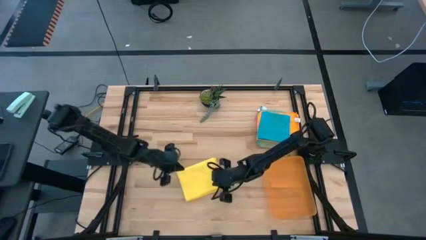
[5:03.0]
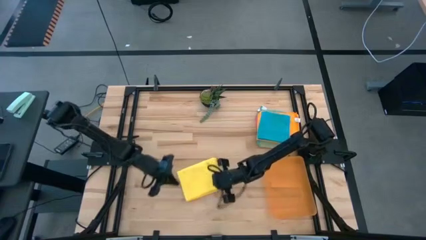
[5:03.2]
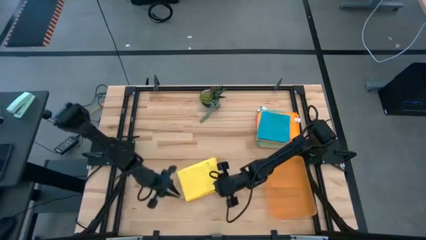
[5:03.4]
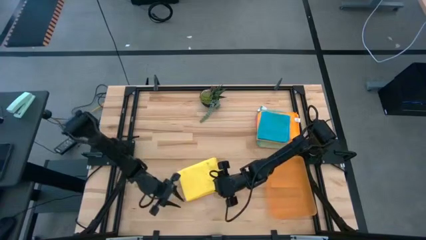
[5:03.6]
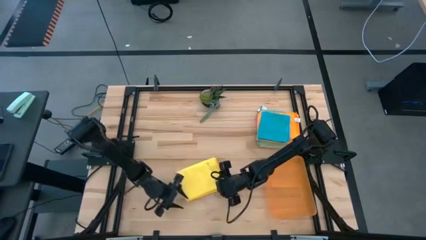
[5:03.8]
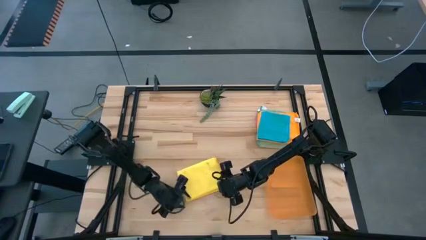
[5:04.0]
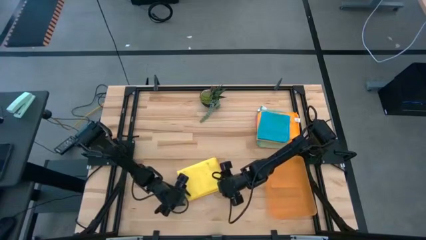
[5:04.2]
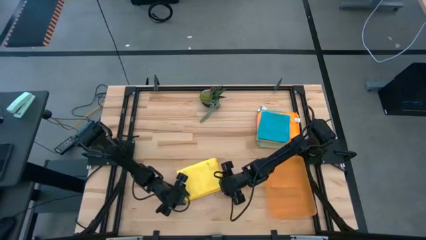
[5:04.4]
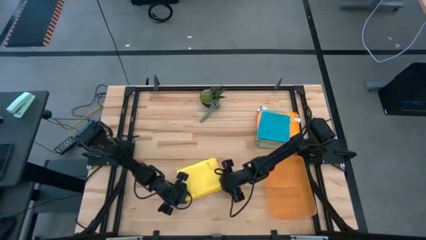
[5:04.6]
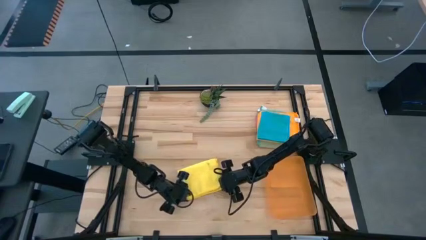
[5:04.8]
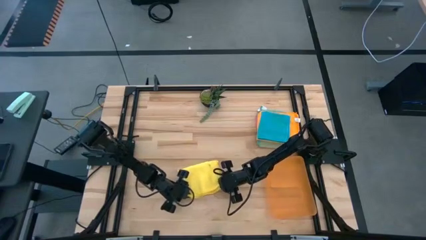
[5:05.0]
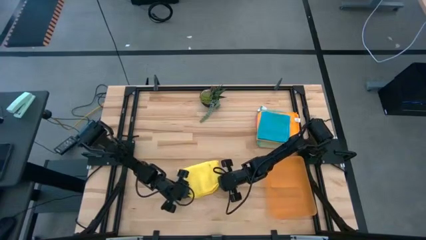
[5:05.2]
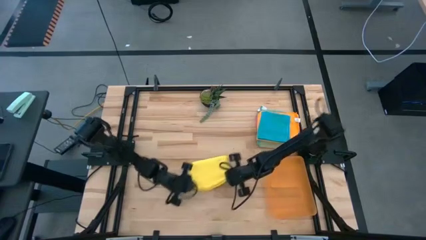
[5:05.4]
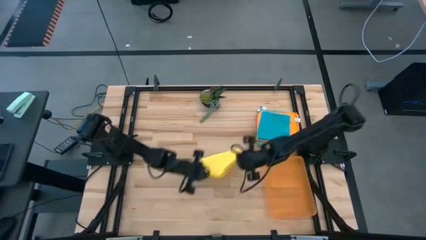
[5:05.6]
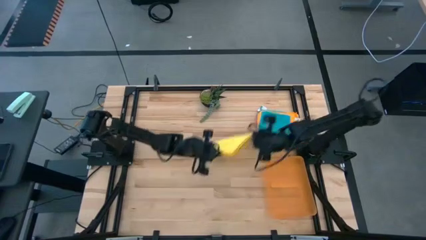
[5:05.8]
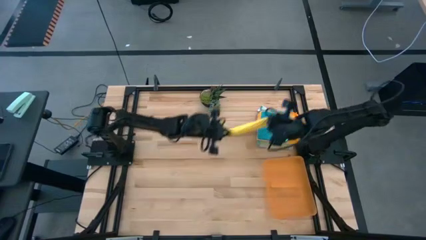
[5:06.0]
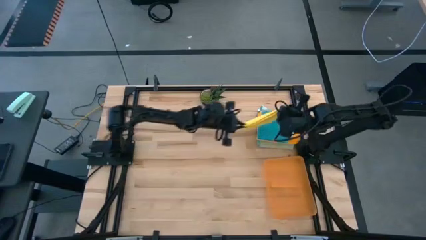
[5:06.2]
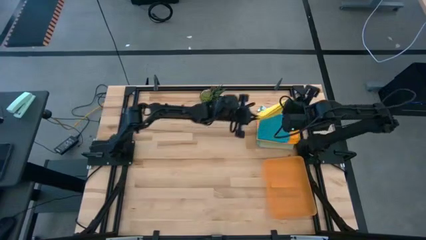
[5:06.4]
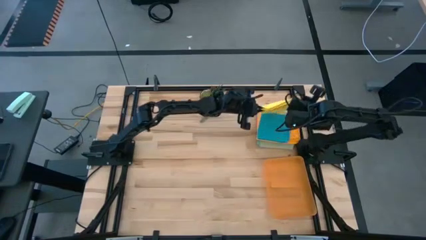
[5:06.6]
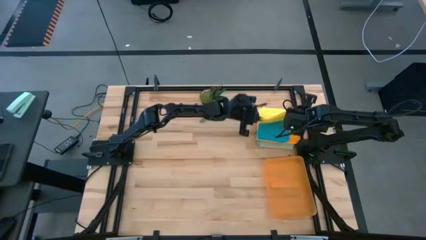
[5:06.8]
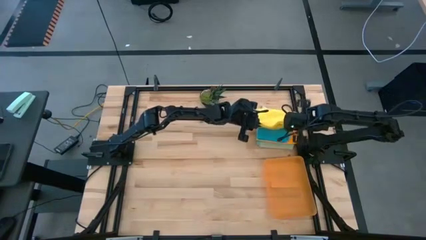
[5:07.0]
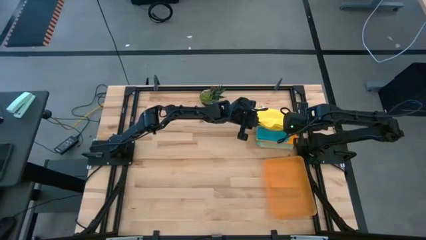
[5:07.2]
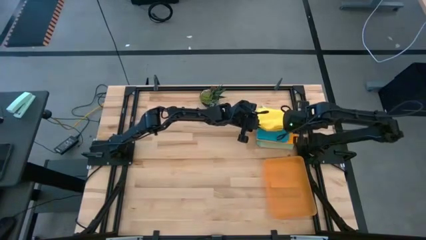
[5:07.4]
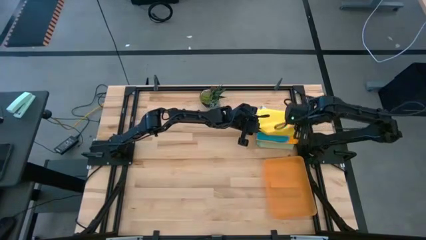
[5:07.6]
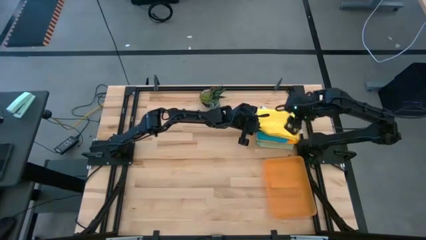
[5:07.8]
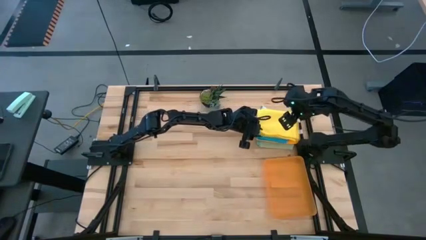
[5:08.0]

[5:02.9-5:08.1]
Task: Fold microfiber towels
Stack the yellow microfiber towel on top of the blue microfiber towel

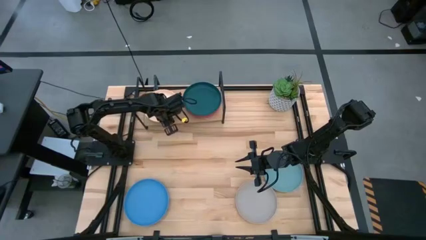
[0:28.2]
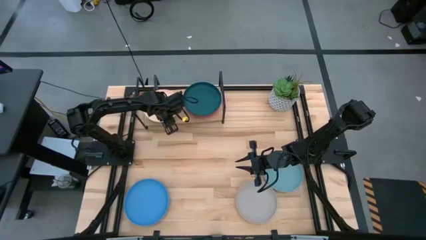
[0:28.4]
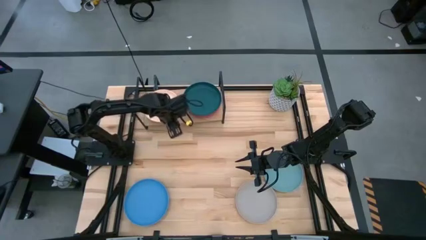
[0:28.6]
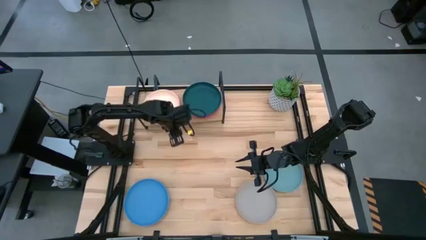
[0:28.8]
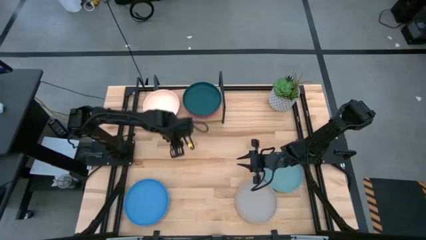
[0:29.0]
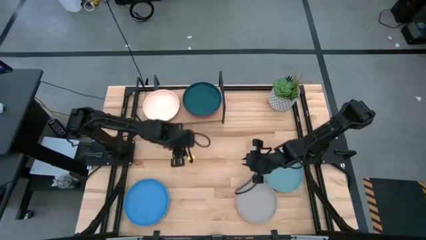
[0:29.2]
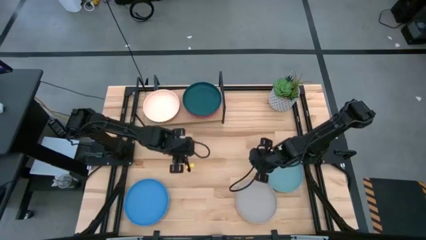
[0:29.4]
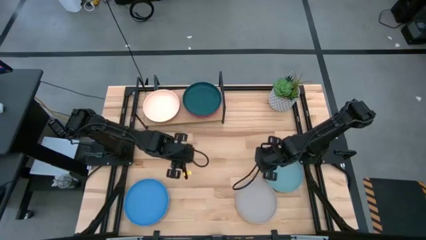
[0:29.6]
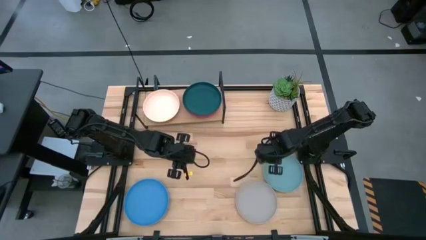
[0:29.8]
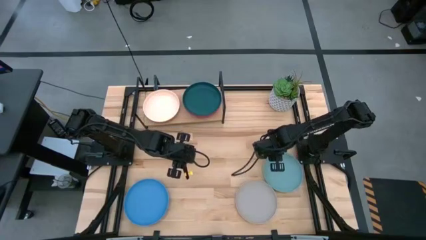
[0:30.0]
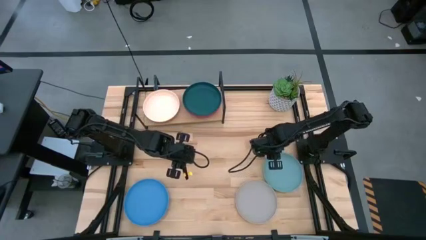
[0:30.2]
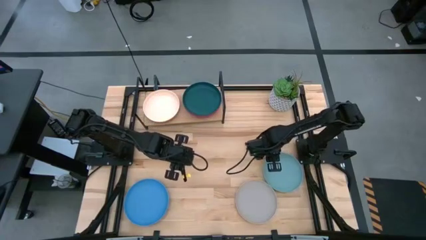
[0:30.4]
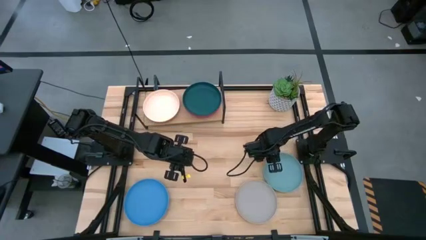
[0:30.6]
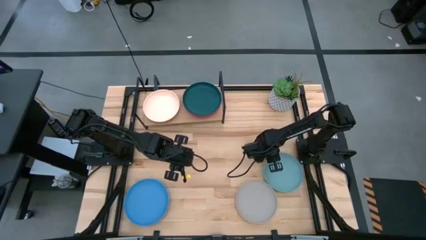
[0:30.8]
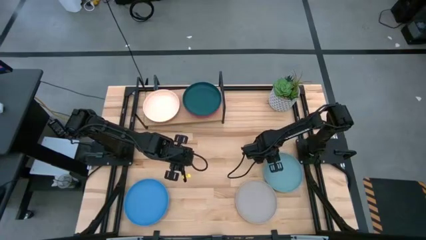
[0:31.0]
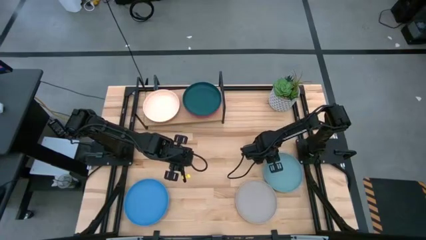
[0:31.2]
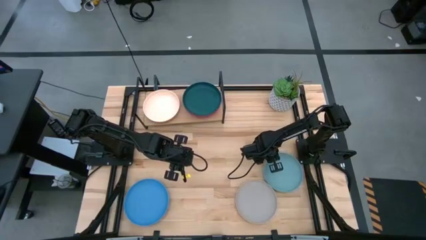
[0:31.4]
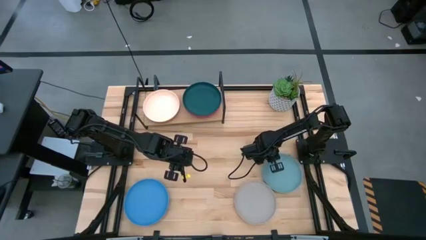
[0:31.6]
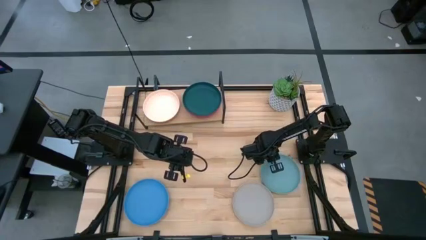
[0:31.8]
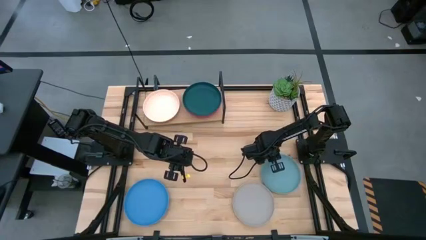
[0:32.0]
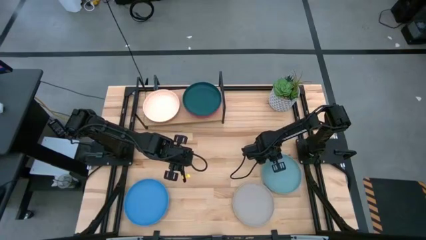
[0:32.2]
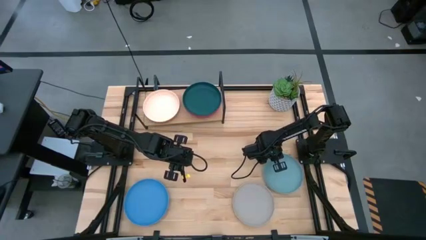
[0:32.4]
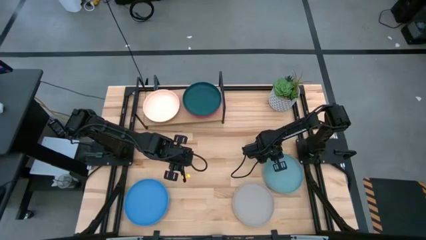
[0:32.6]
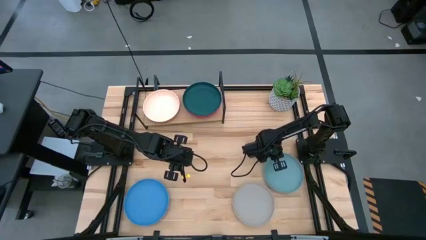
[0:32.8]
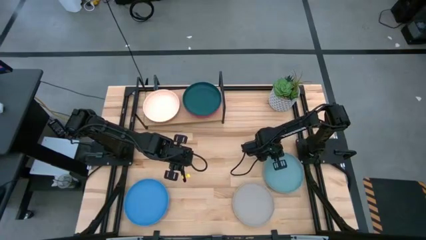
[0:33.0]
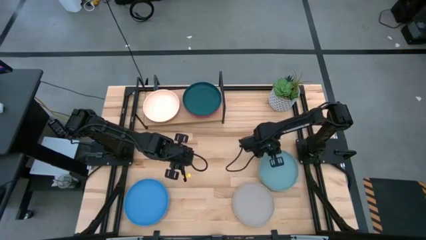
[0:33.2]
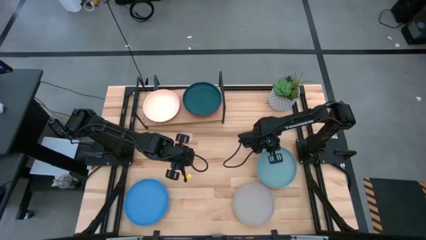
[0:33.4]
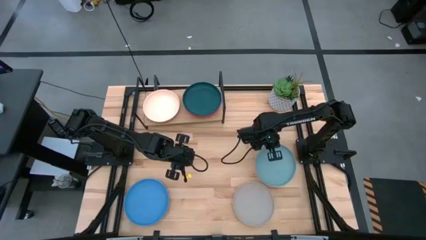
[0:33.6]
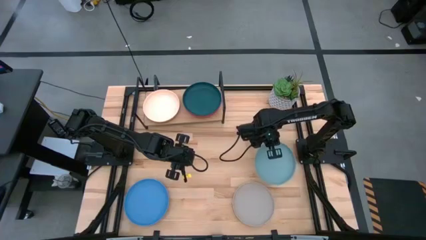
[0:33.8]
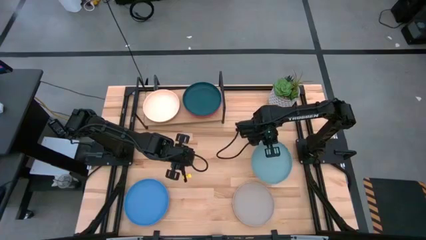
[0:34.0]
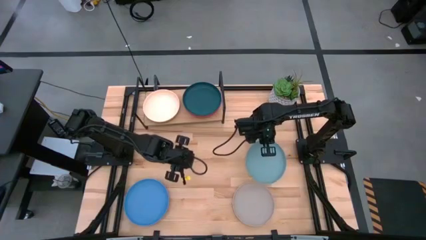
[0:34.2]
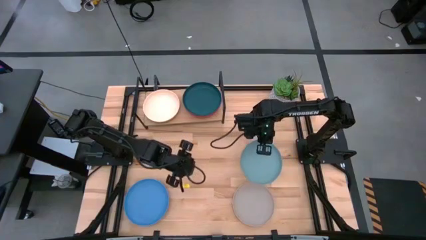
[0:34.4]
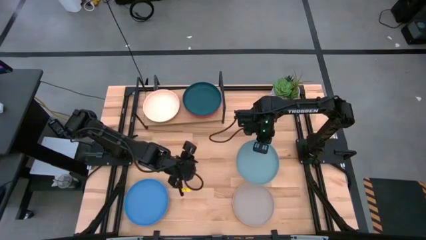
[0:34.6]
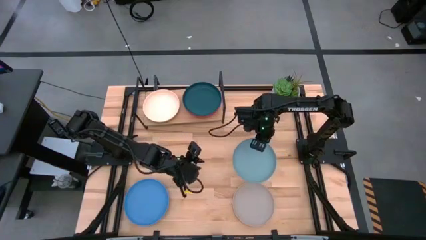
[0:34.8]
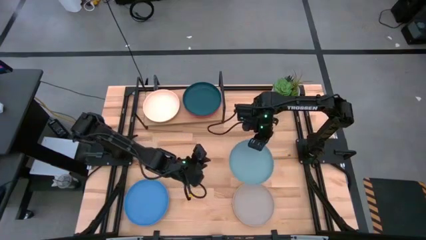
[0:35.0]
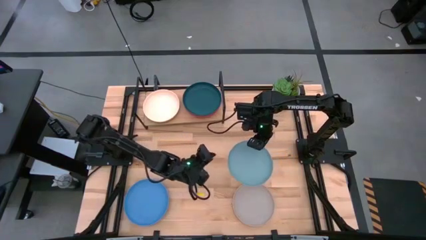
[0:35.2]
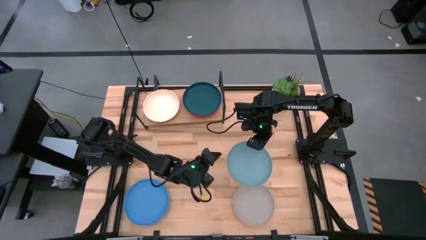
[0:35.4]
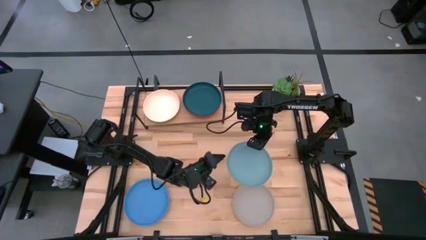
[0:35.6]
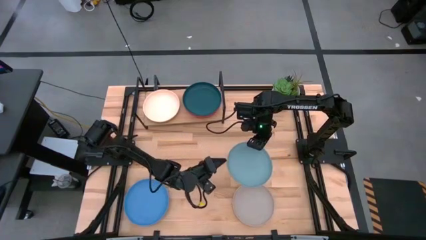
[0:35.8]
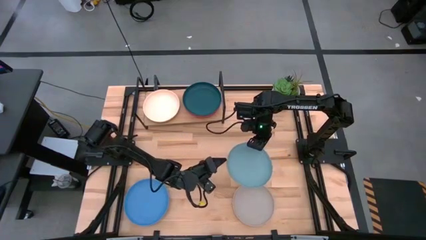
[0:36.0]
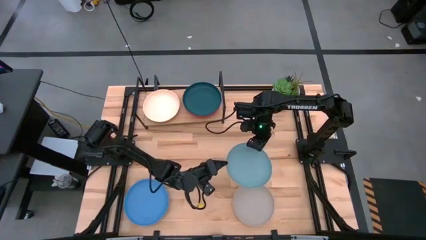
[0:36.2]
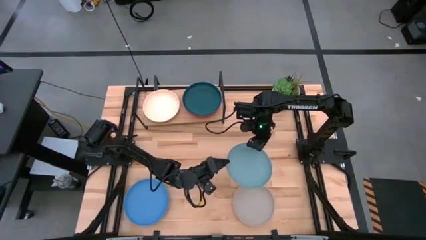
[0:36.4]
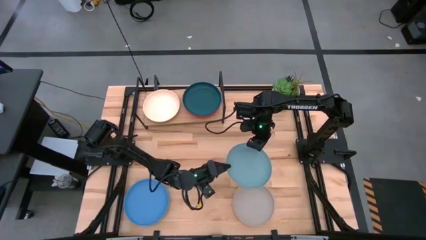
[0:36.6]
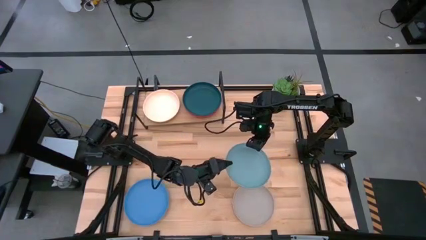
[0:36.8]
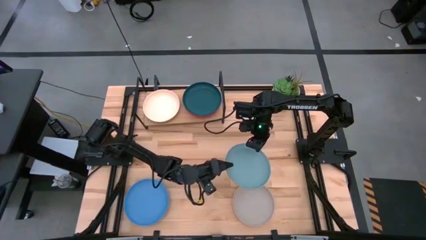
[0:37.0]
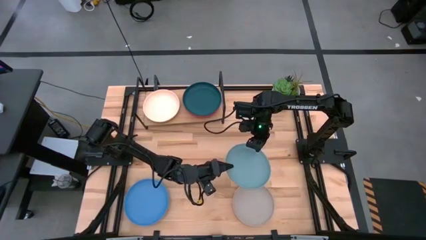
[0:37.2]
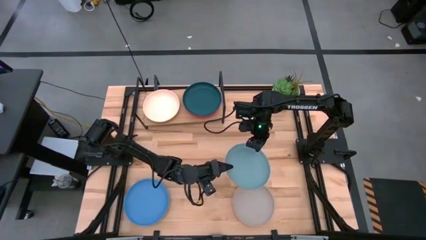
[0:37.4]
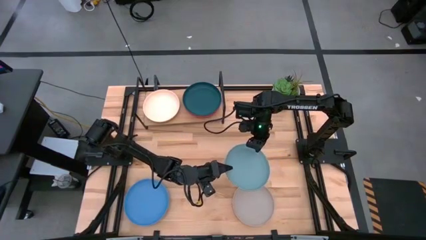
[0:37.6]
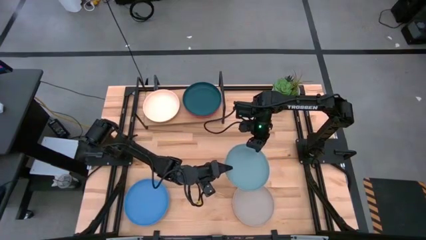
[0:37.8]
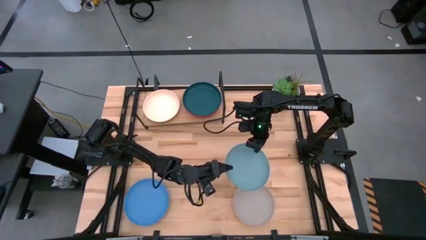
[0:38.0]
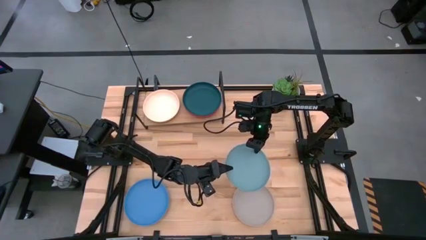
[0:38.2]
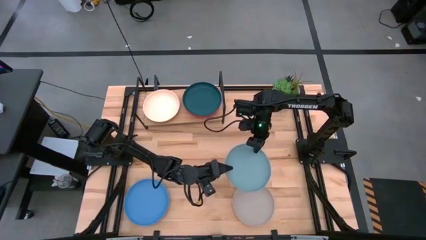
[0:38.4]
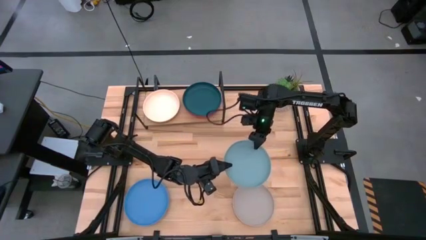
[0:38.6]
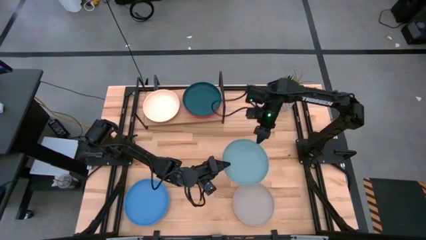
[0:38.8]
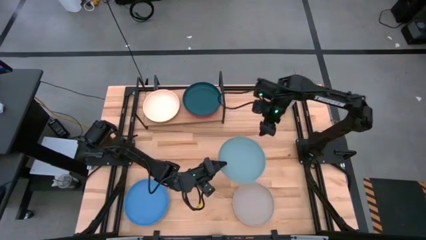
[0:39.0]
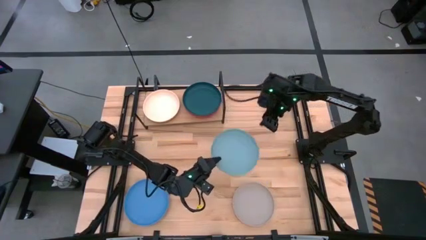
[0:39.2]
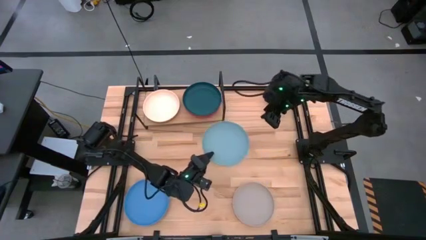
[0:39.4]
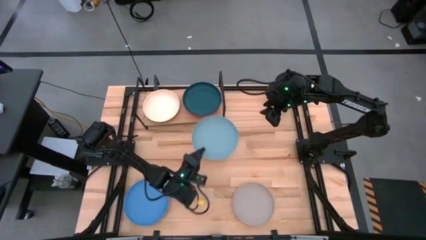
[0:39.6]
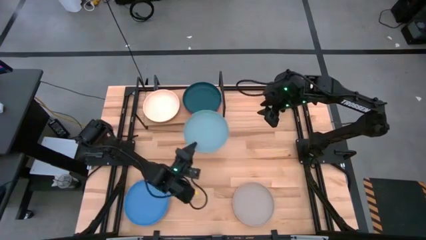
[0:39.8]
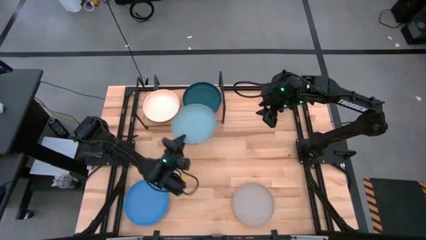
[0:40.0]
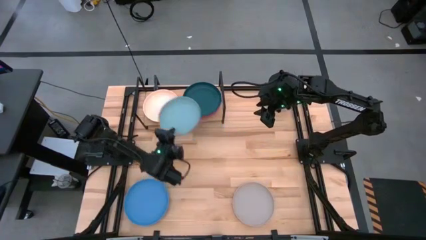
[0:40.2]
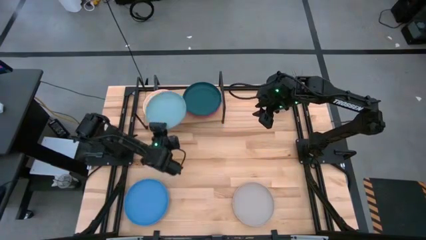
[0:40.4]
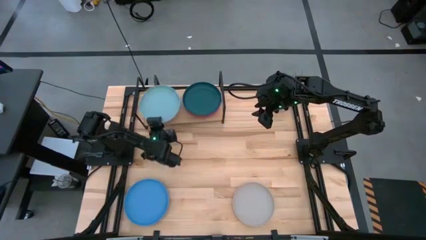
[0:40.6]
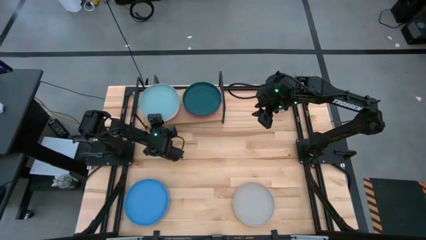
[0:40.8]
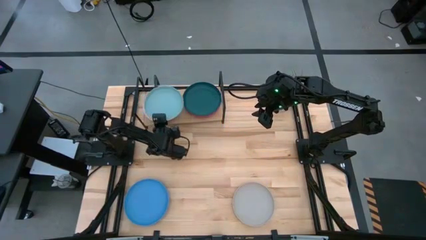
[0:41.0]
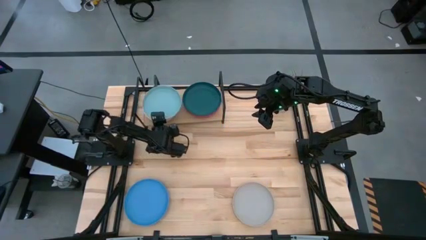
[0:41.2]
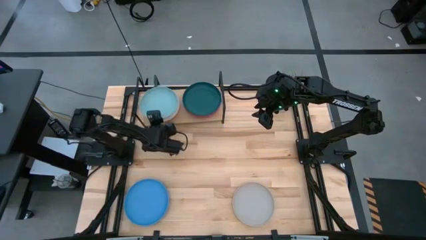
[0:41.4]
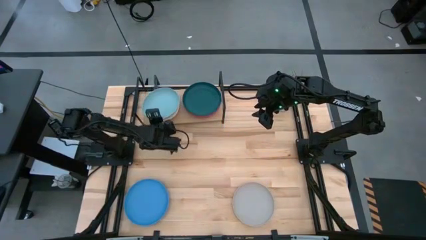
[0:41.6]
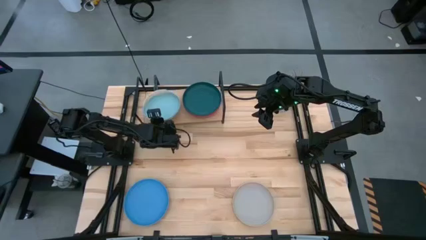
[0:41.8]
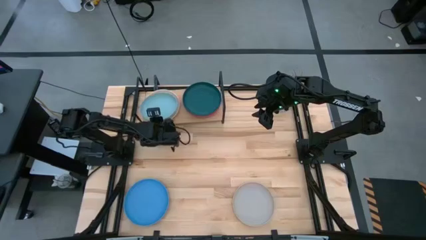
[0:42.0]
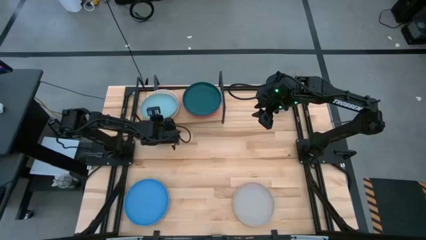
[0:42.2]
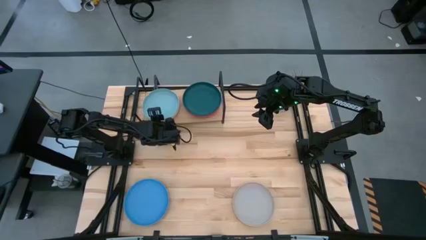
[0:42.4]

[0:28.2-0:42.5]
Task: Place and stack plates onto a shelf
Stack the light blue plate on top of the light orange plate on the shelf
